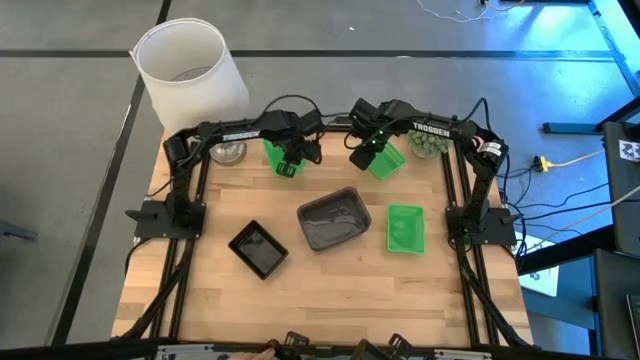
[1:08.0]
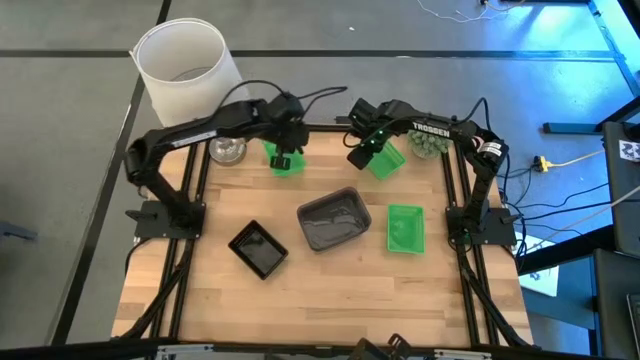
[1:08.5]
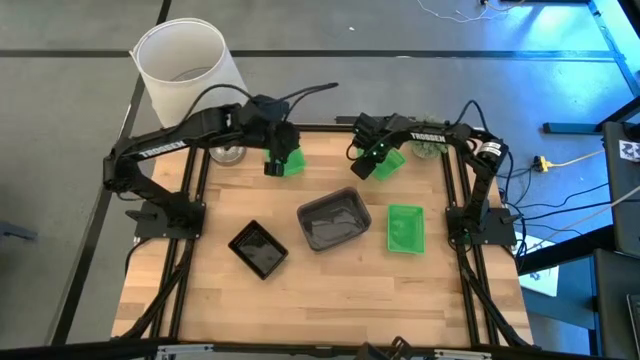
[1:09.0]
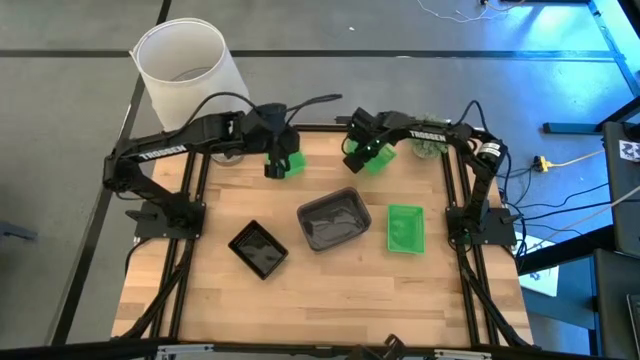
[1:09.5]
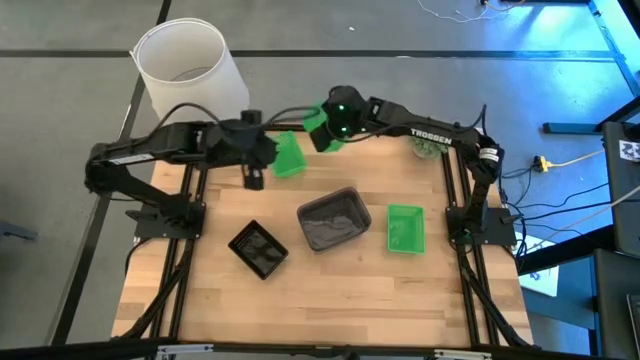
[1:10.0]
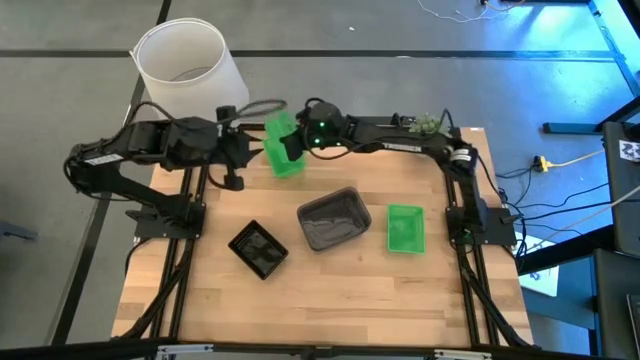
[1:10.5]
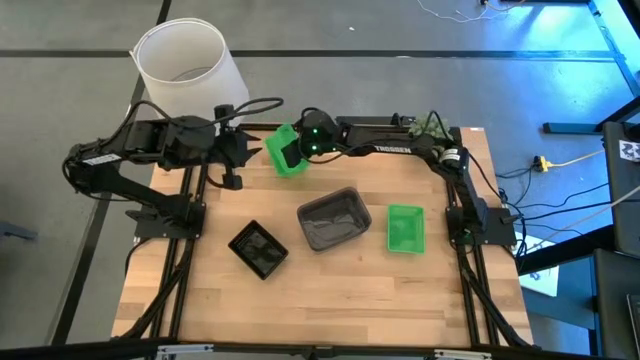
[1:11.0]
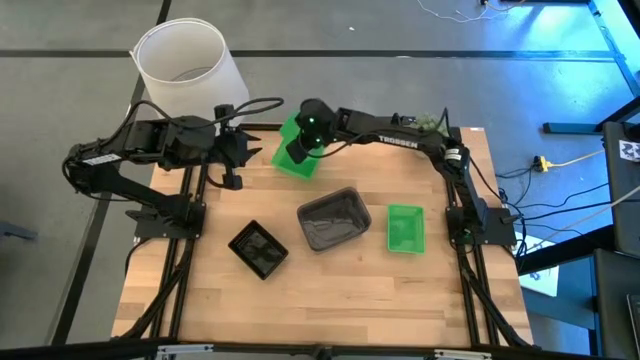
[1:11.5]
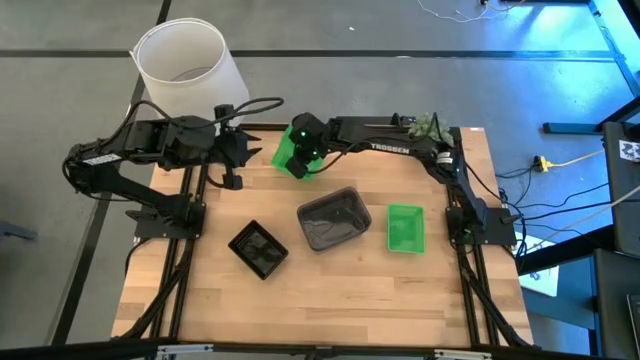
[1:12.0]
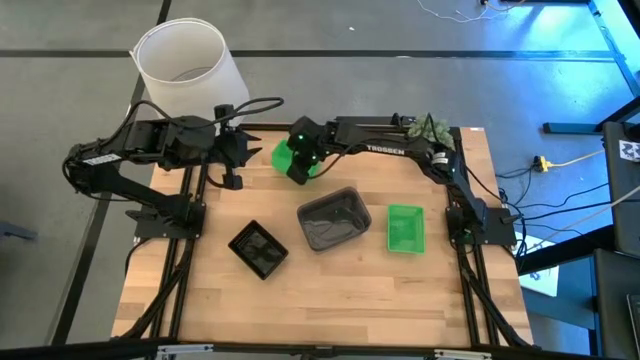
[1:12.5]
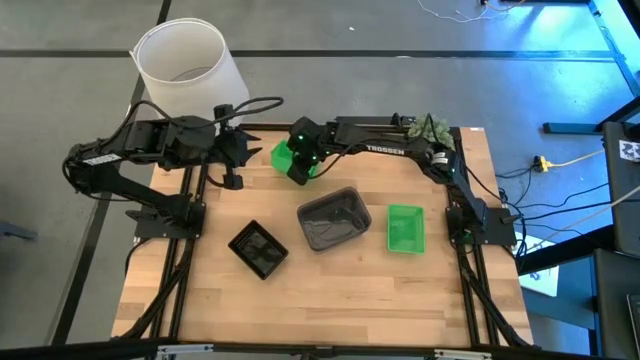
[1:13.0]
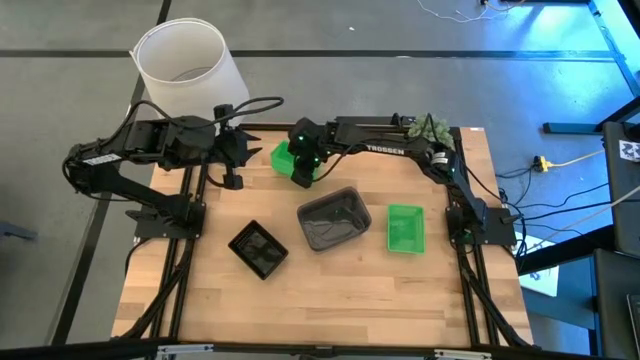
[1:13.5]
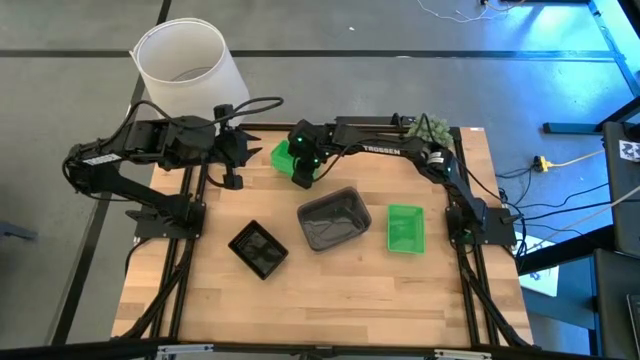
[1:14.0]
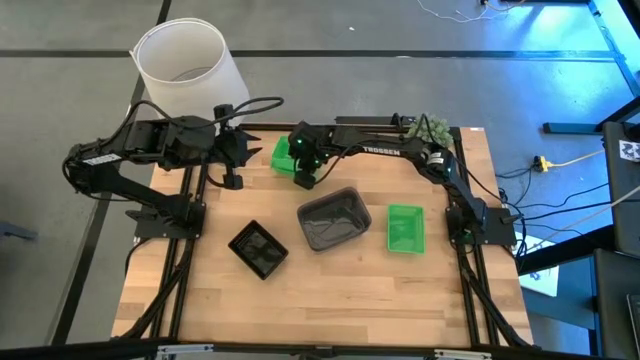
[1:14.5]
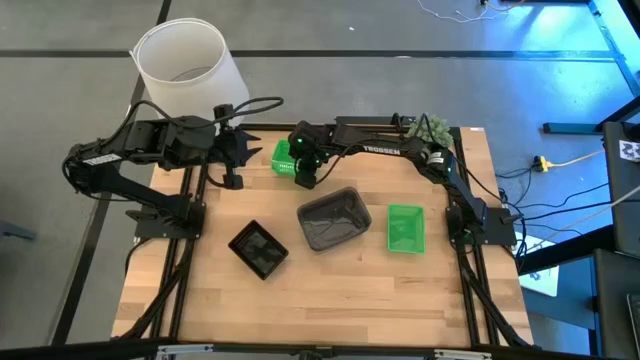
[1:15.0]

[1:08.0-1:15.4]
Stack the right green bin on top of the left green bin

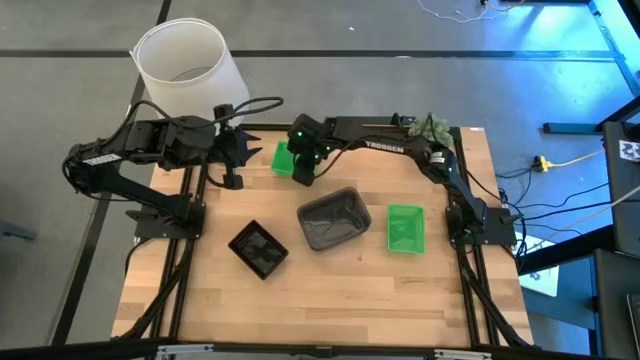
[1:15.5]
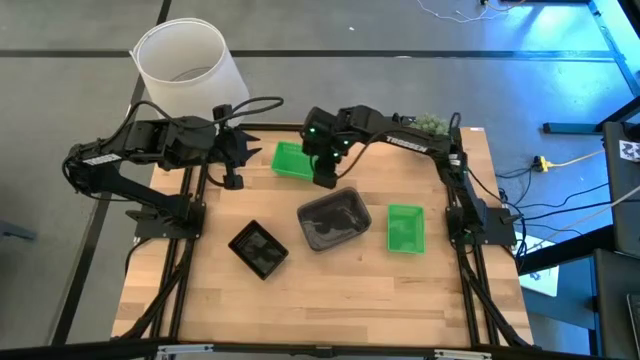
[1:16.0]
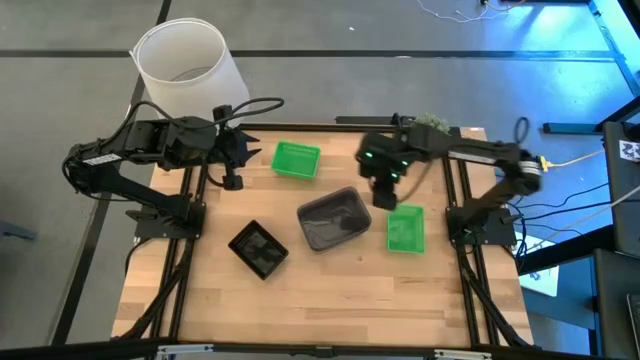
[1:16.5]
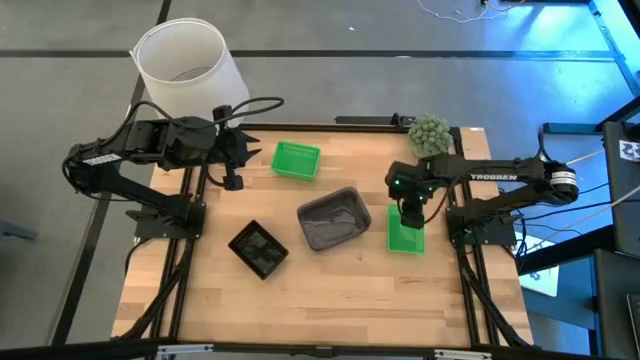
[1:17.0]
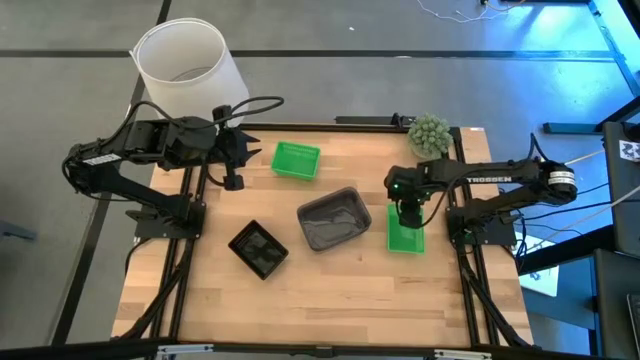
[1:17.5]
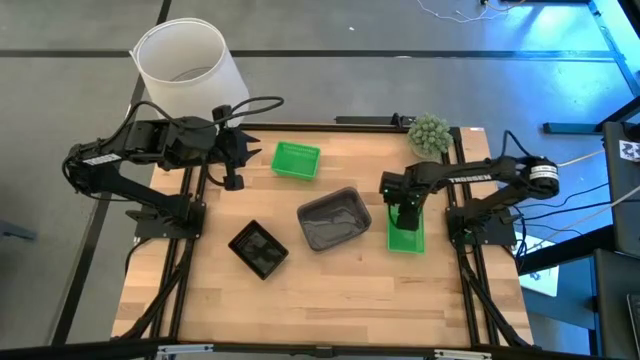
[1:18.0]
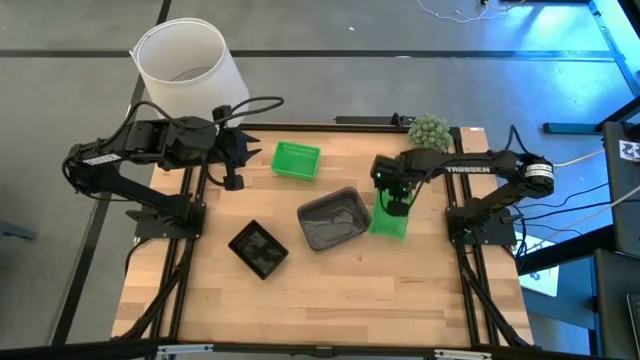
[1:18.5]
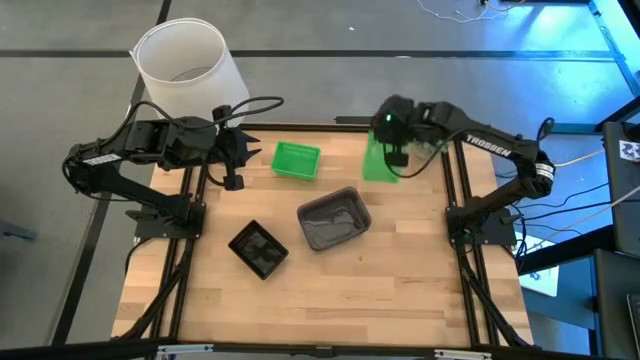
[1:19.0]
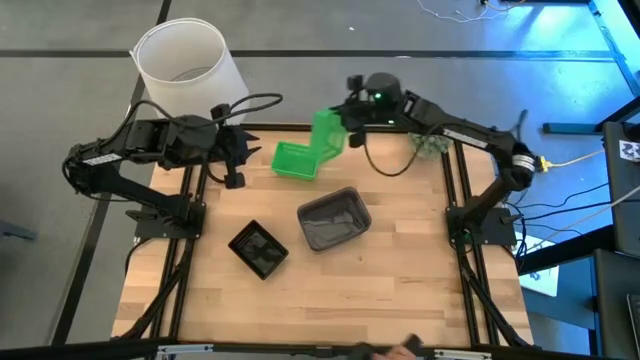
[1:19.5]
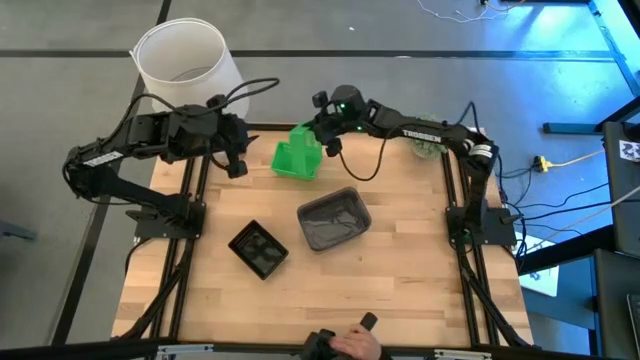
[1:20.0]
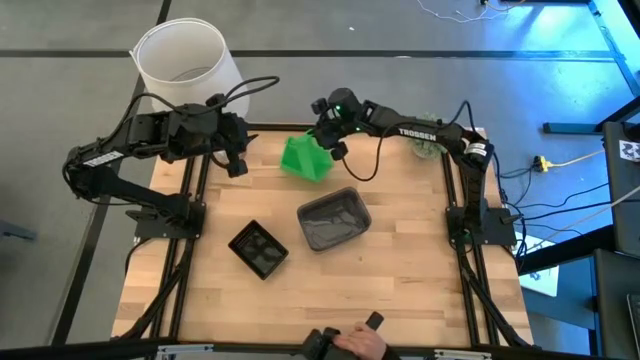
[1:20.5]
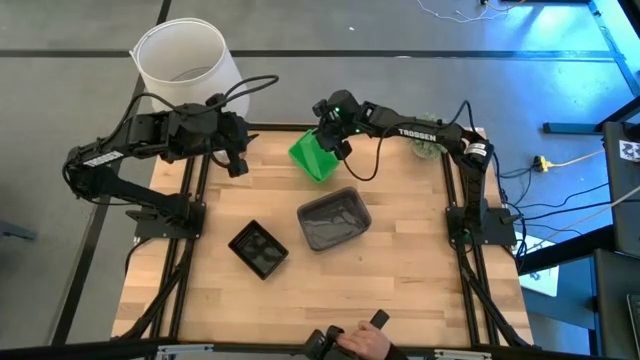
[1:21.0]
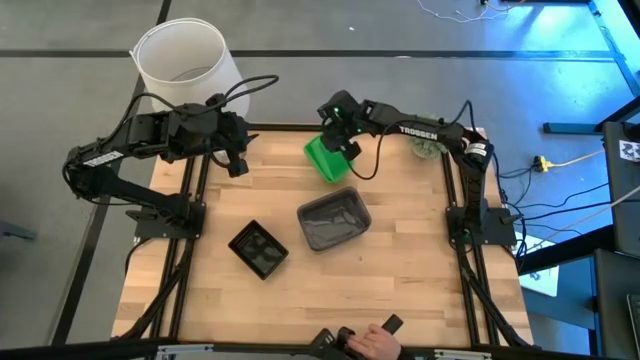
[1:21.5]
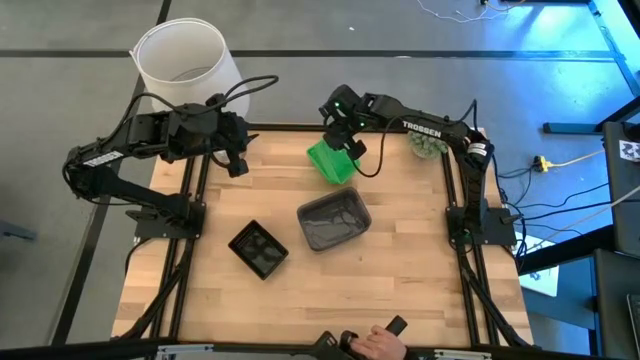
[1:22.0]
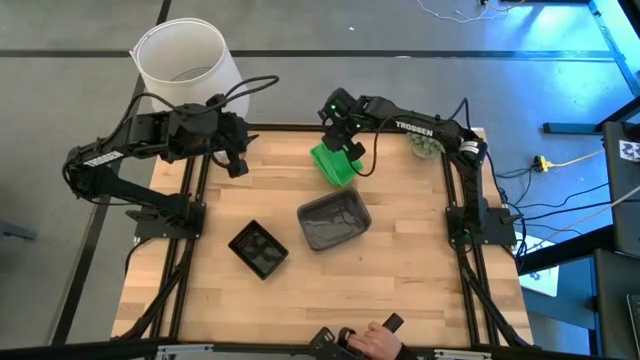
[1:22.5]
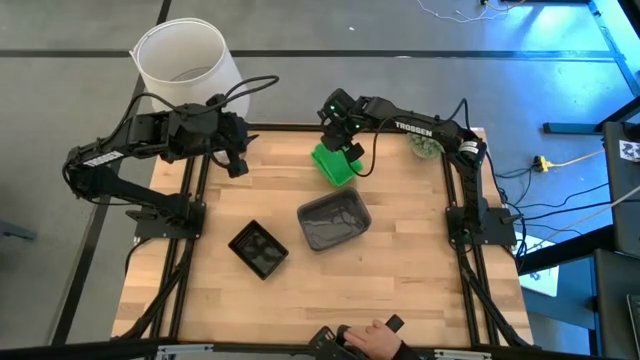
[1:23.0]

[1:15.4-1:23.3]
Stack the right green bin on top of the left green bin

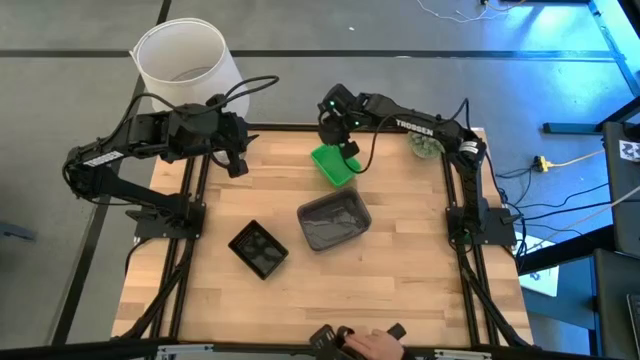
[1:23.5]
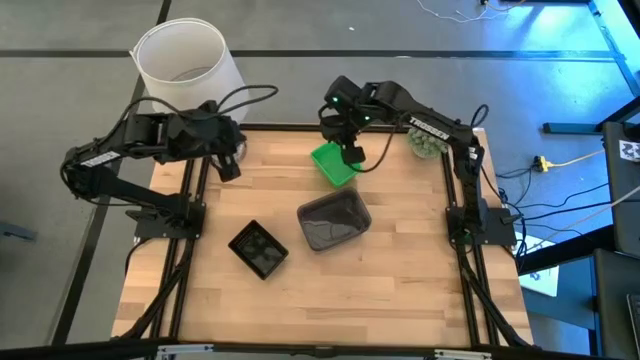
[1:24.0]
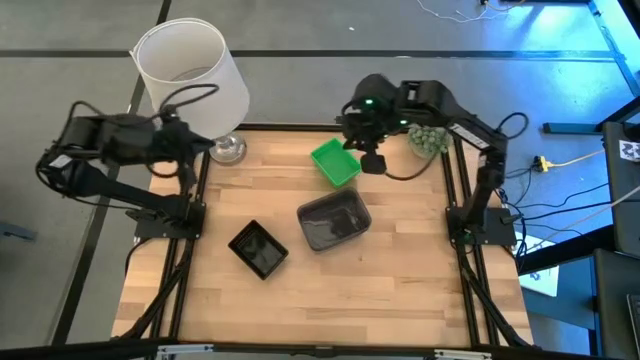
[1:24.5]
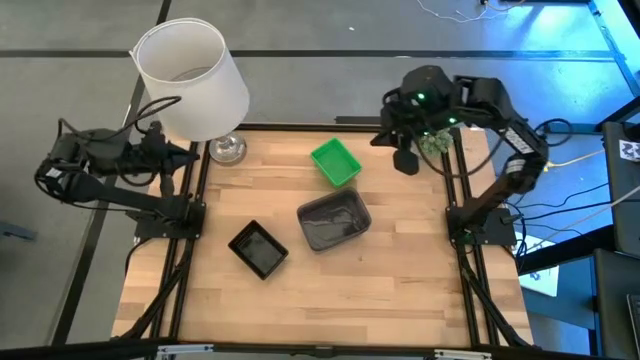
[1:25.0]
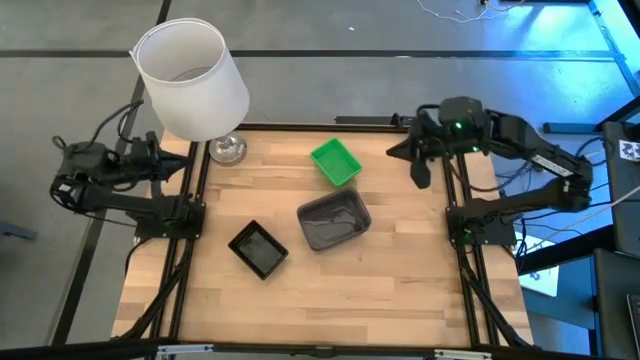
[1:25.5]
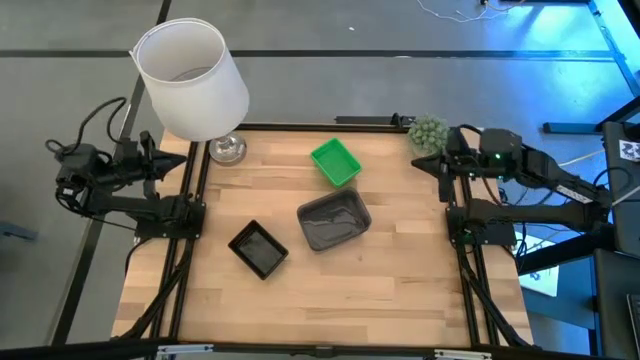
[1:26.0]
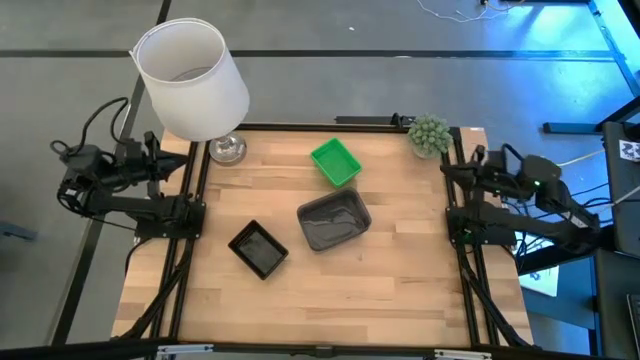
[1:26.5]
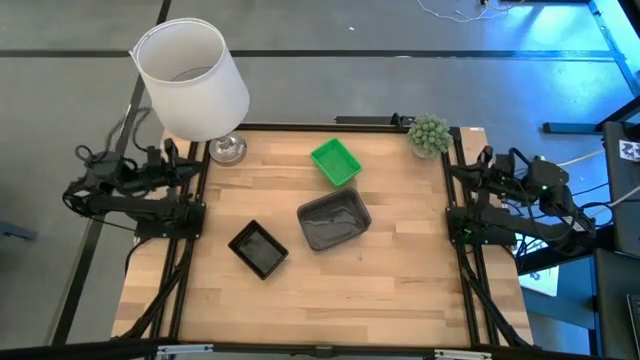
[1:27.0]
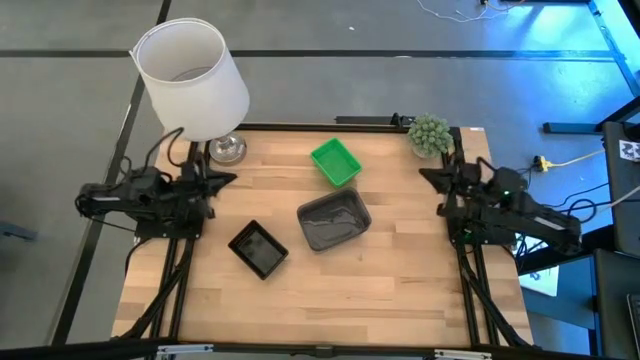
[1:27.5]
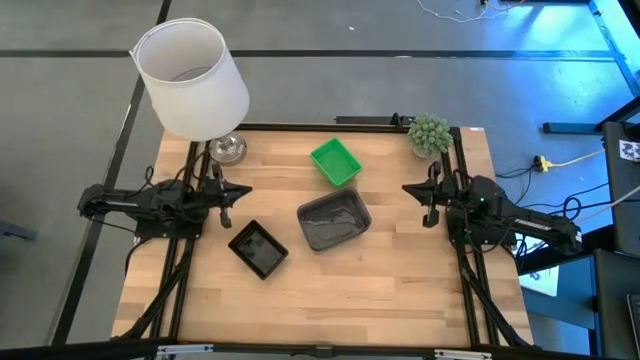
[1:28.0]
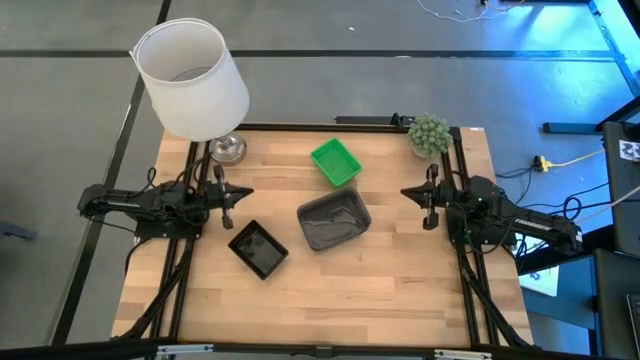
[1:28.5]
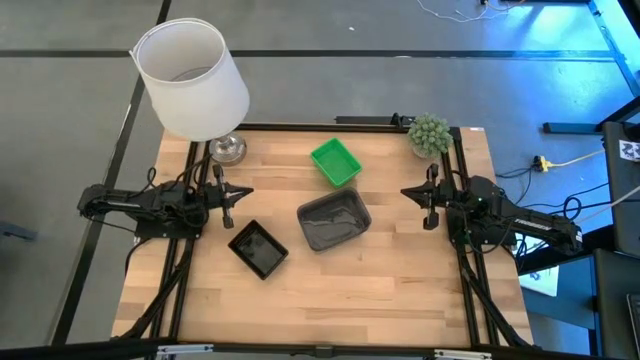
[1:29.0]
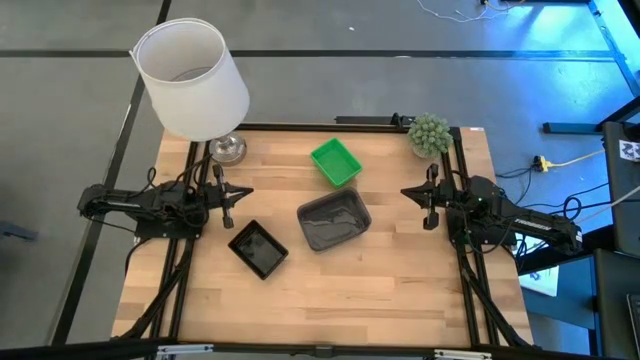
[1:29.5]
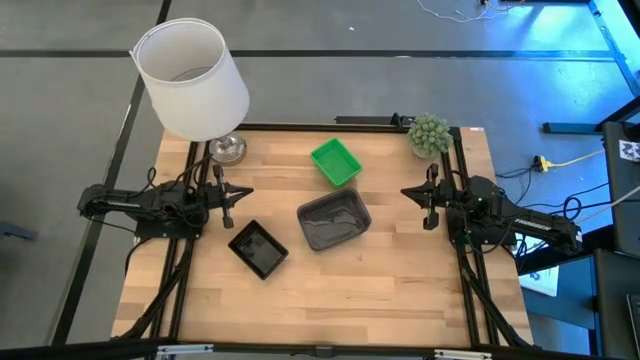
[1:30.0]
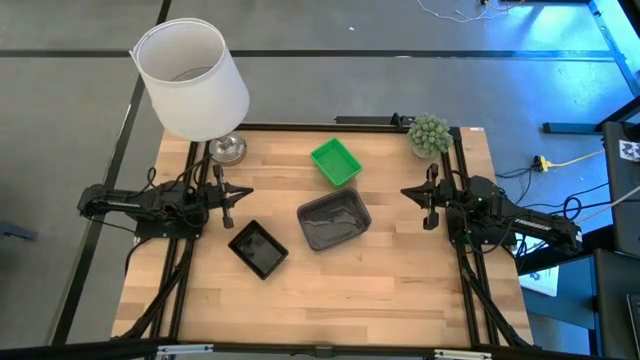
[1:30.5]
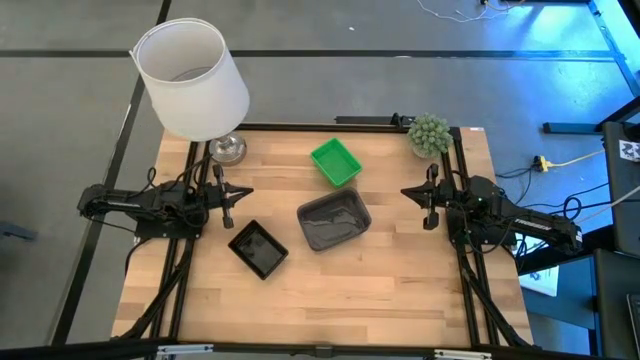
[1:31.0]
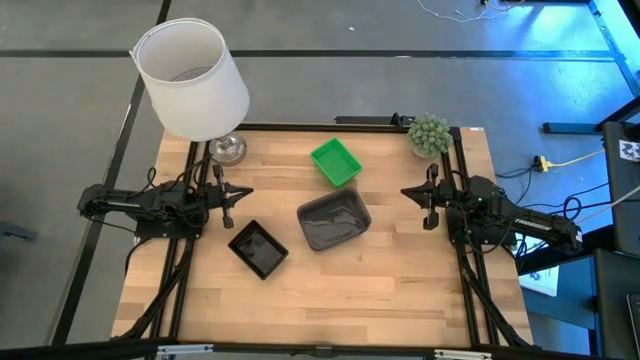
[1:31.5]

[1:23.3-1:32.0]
Return to Home Position
